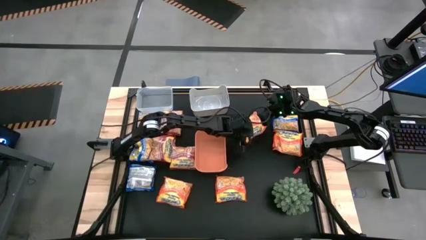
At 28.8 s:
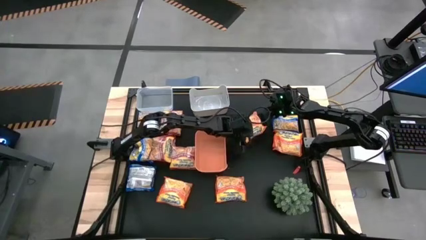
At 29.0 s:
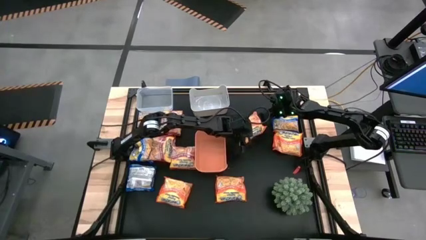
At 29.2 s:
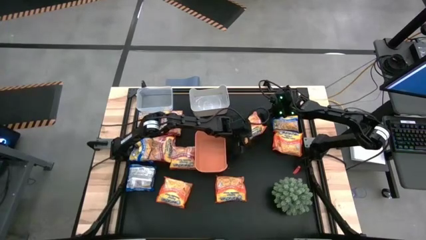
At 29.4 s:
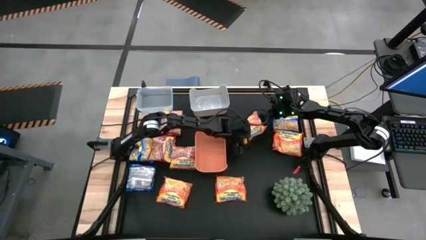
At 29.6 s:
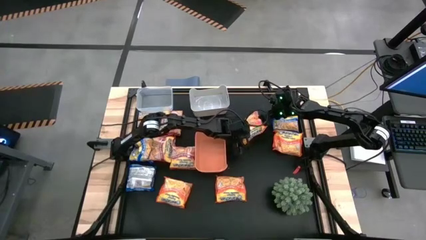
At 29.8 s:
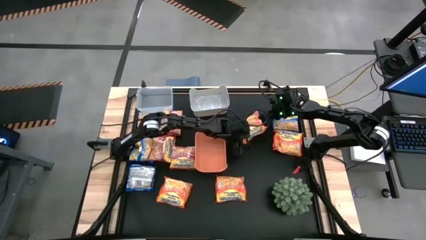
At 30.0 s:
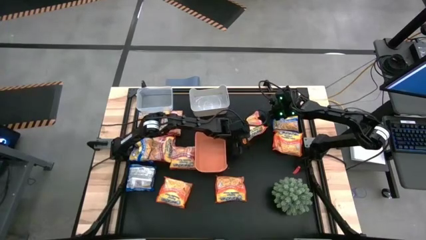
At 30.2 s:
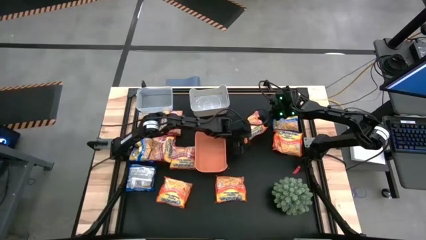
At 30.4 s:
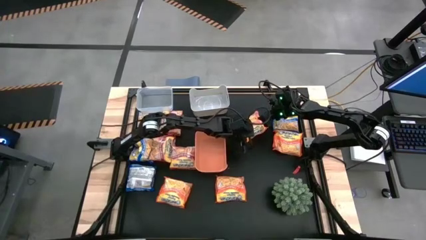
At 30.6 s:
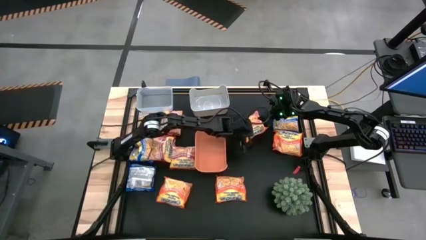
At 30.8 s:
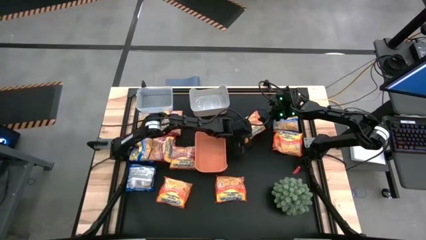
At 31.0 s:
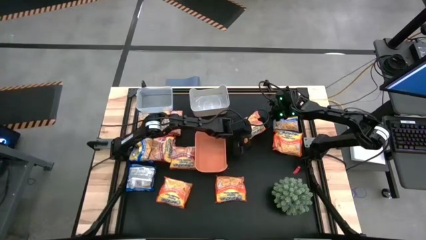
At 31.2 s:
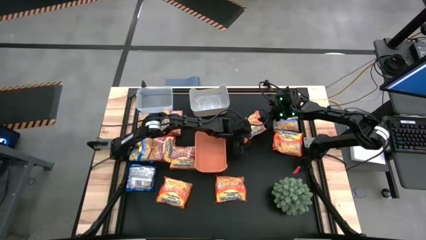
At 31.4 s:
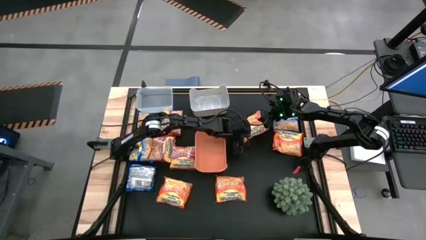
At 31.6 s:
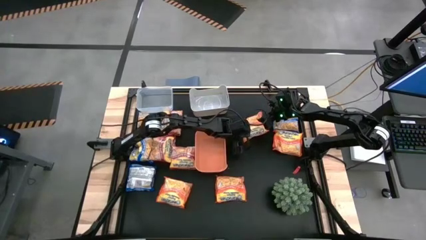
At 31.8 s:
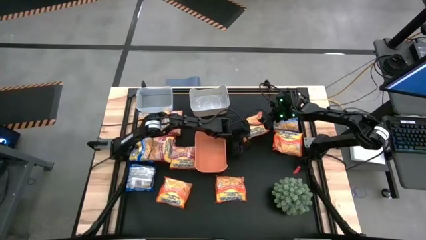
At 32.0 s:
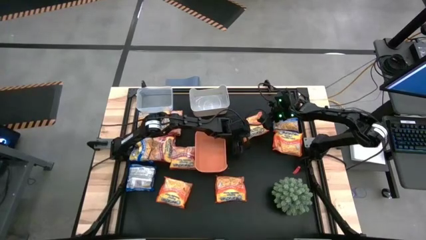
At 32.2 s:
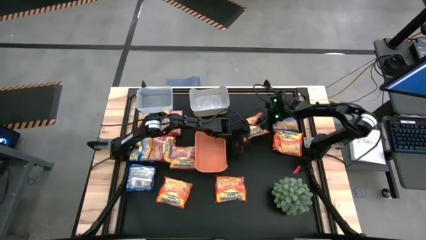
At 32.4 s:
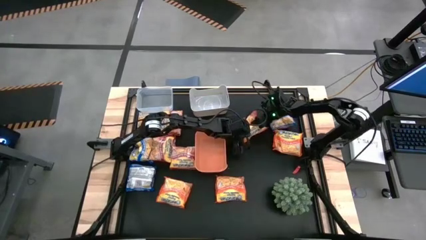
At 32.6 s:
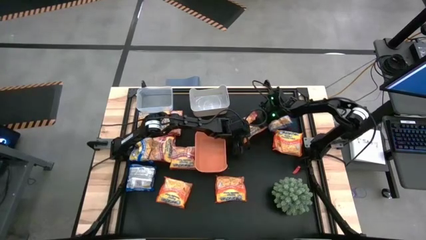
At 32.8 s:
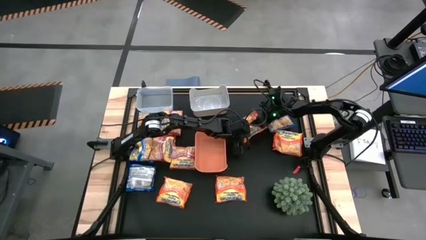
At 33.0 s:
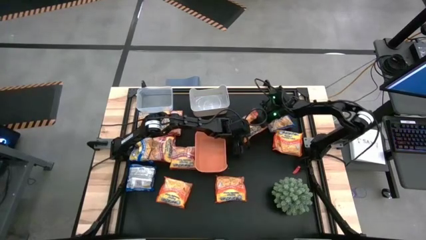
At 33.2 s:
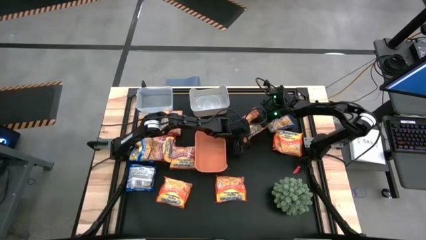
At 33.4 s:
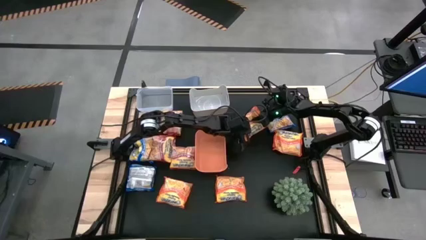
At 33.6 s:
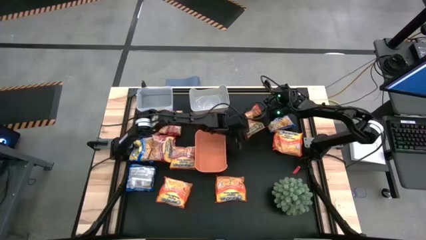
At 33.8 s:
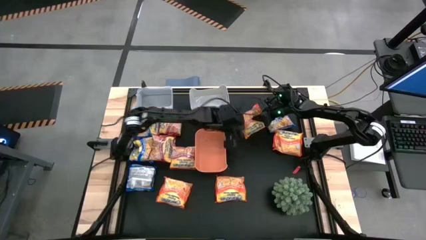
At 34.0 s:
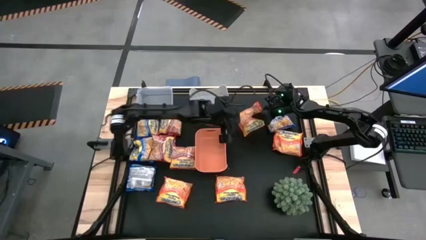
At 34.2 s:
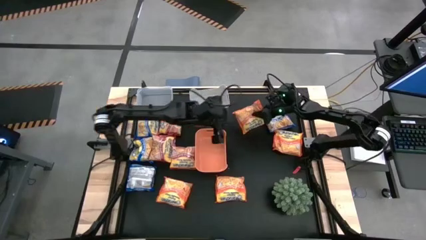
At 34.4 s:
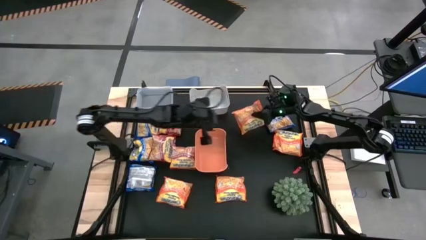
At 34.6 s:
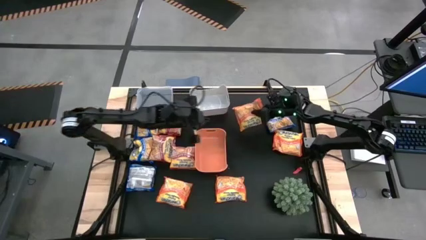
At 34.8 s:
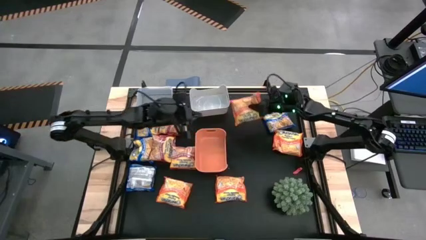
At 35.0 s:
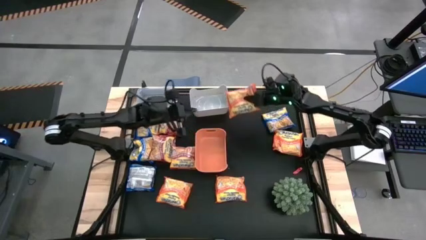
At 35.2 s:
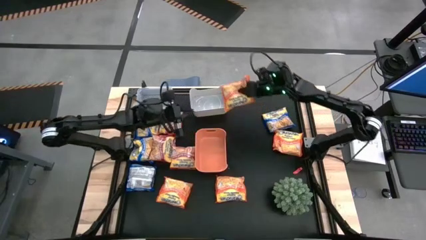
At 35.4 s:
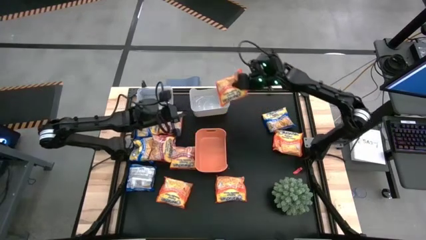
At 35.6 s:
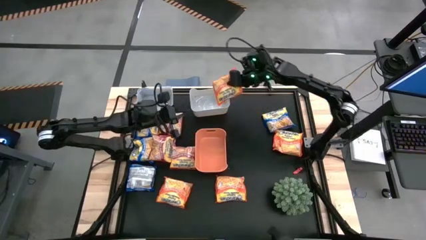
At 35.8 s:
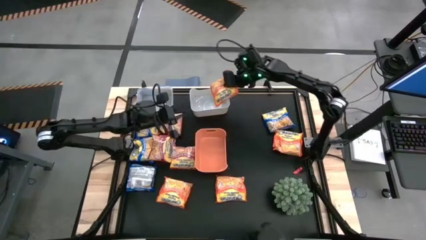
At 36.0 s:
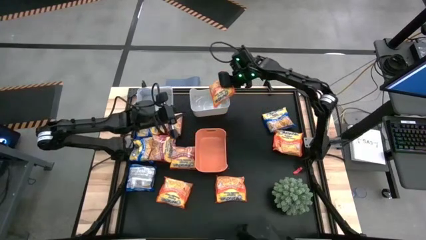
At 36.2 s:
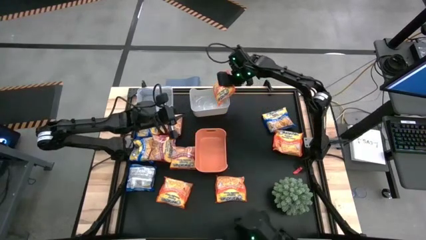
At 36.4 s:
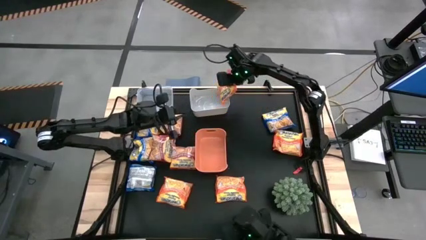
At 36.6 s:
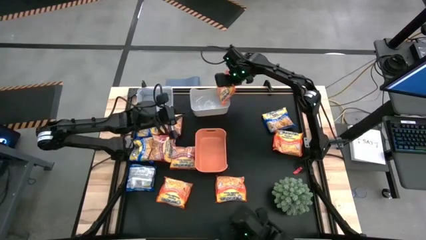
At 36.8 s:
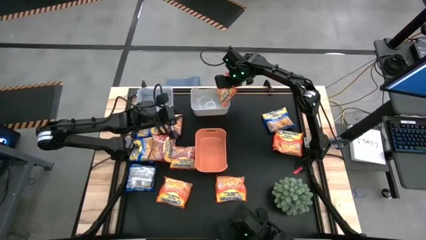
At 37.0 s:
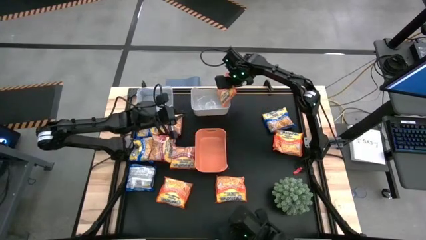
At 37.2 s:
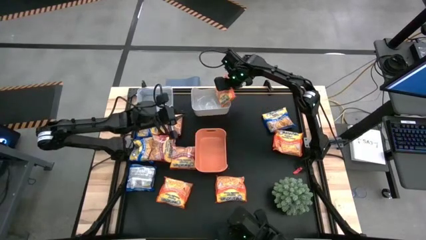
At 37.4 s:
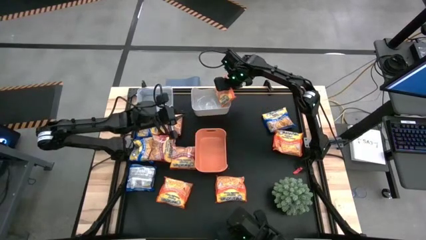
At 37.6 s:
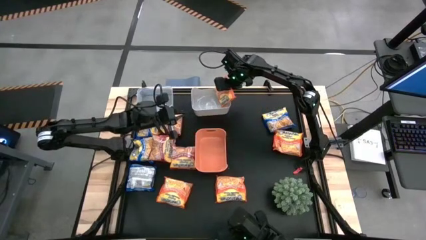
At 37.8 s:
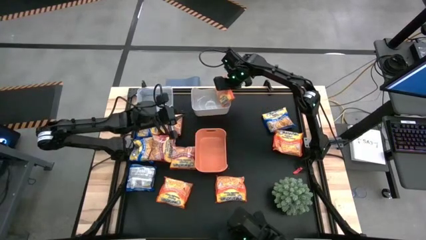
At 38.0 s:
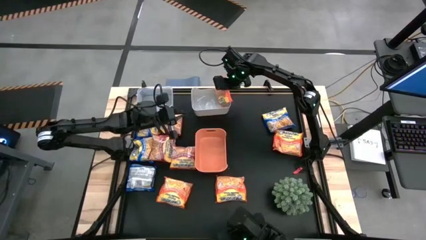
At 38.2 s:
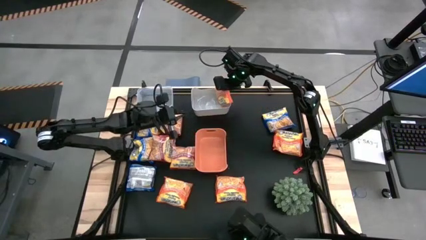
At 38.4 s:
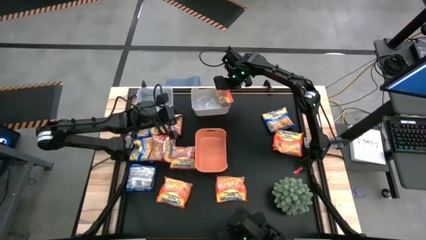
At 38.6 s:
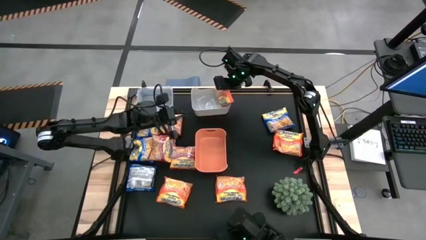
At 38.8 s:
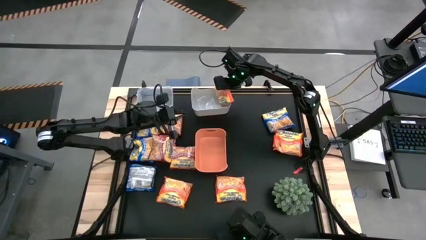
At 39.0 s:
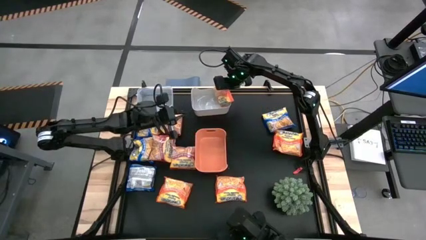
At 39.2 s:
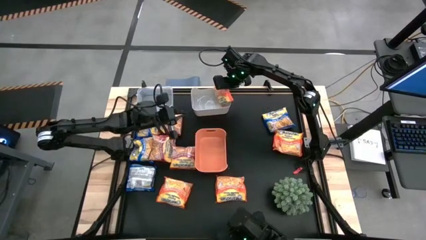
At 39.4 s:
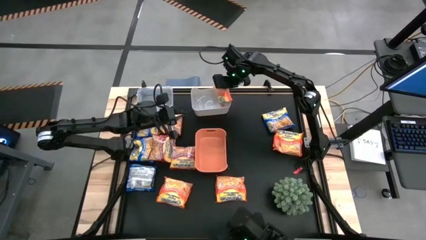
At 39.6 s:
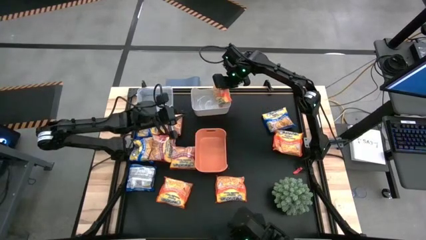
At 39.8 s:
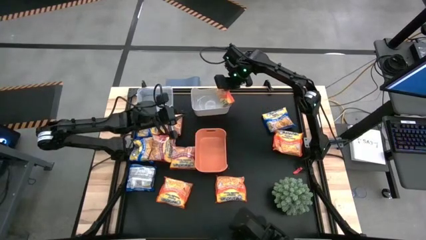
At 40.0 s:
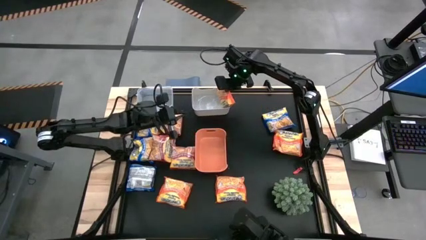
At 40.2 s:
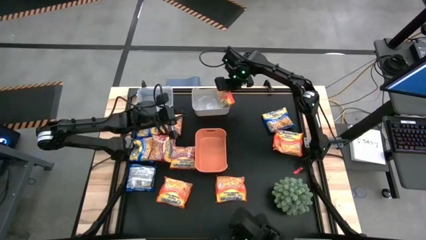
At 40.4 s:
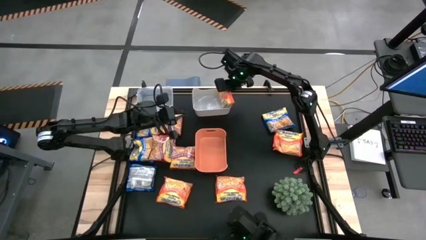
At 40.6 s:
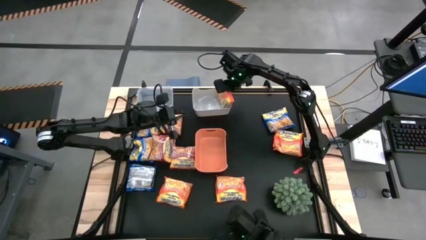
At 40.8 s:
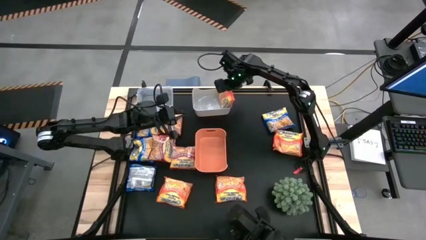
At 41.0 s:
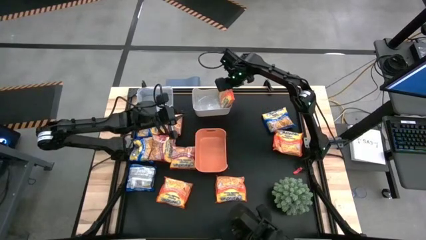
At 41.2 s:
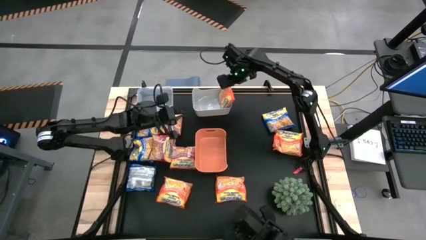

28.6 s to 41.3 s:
Task: Sort Maruchan noodles
Put the orange bag into the white bin

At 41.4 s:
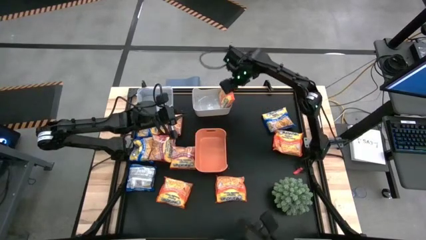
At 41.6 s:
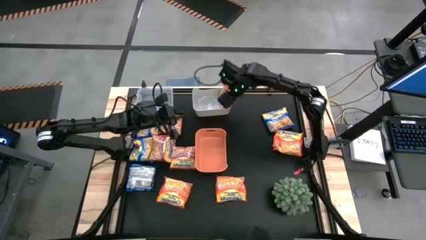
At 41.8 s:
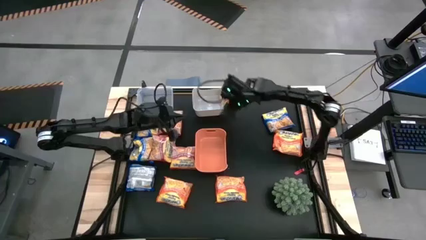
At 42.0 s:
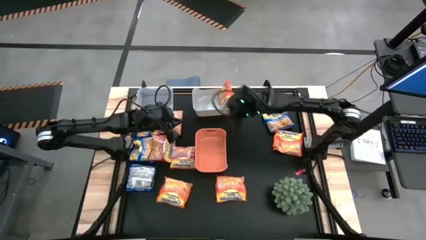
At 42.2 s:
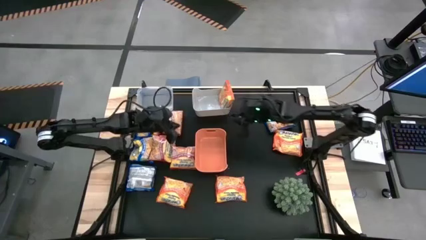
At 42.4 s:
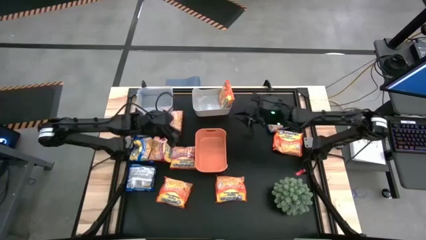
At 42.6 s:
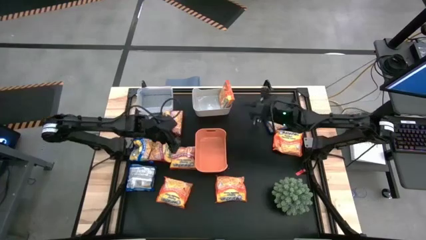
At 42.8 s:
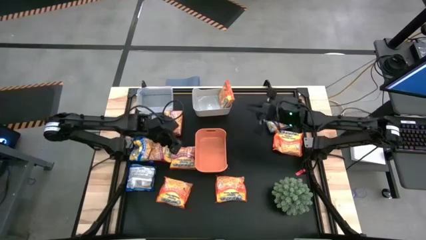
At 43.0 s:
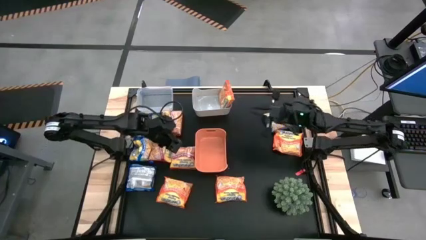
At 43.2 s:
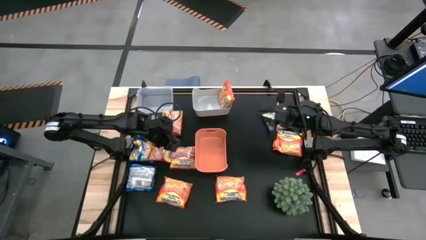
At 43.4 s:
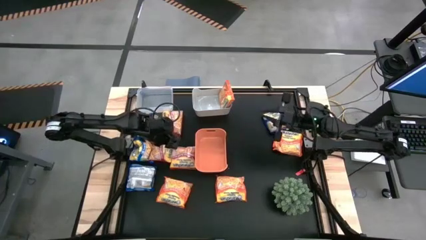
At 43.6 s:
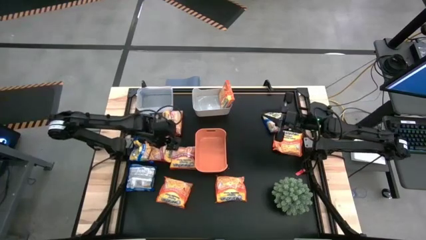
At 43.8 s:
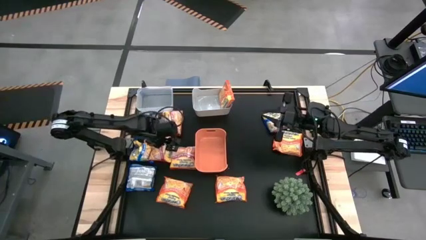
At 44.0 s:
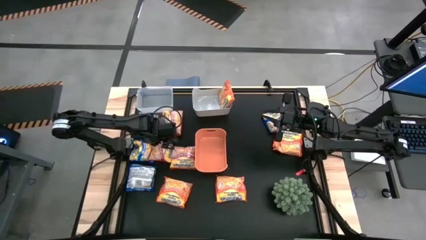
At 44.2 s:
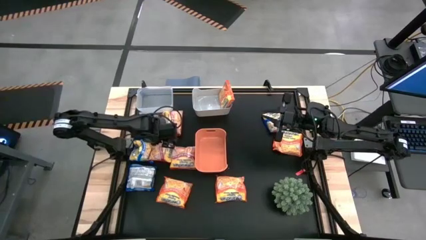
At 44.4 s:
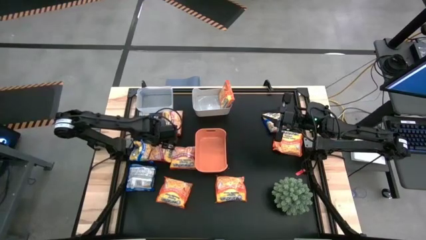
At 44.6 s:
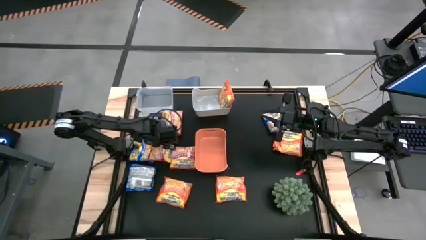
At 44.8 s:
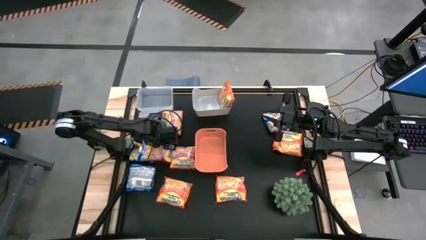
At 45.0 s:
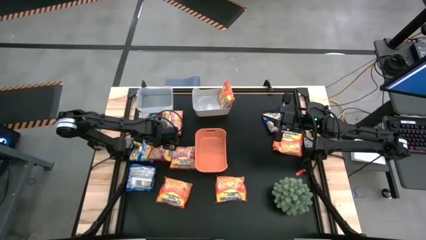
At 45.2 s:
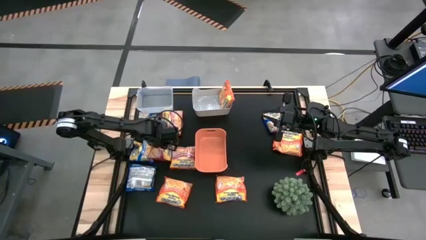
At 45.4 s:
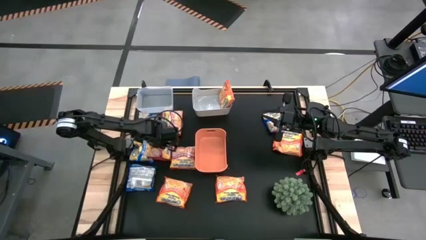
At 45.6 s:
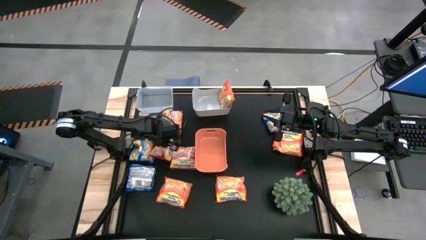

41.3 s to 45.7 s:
Put the red bag into the transparent bin
